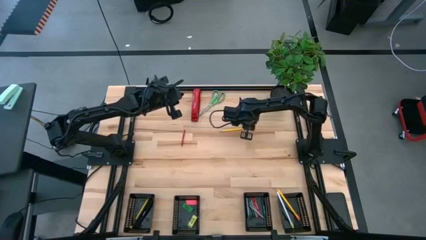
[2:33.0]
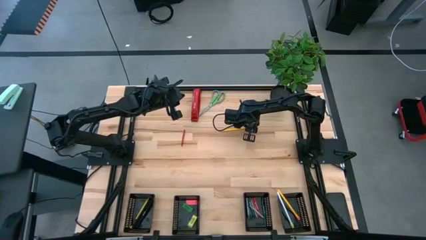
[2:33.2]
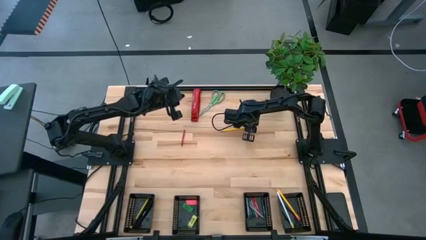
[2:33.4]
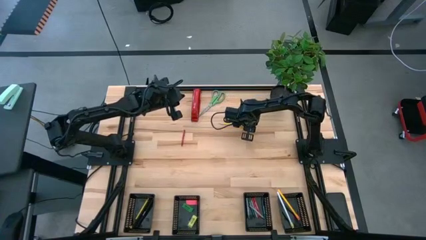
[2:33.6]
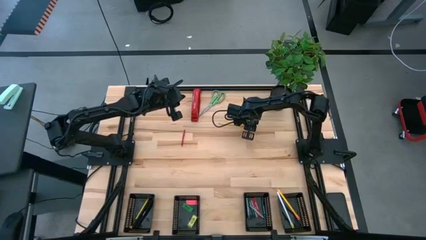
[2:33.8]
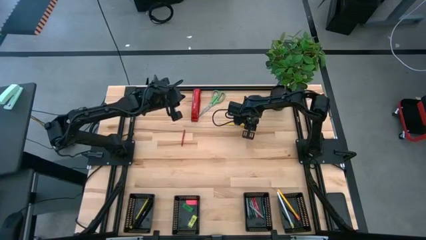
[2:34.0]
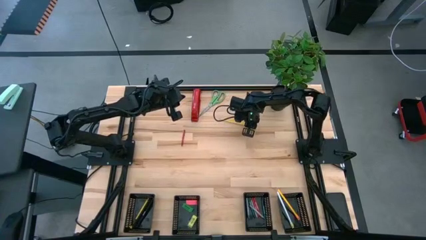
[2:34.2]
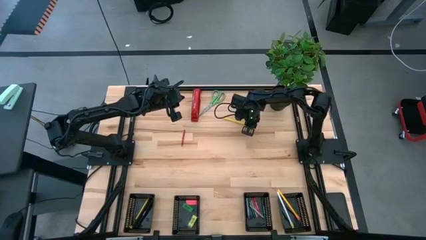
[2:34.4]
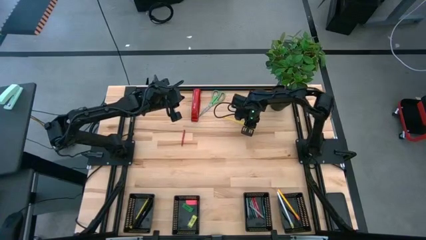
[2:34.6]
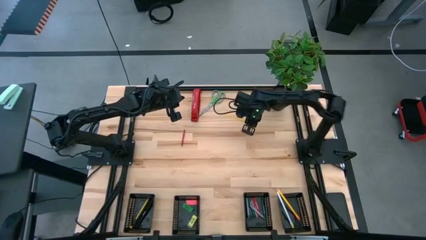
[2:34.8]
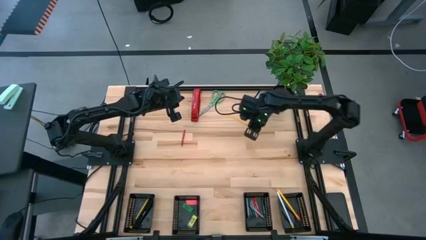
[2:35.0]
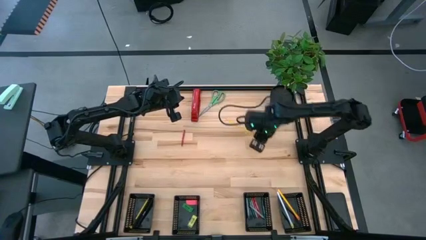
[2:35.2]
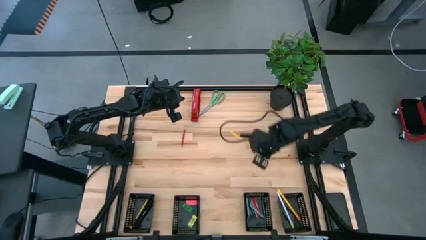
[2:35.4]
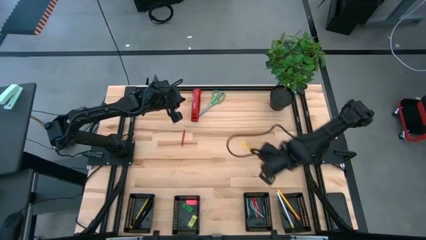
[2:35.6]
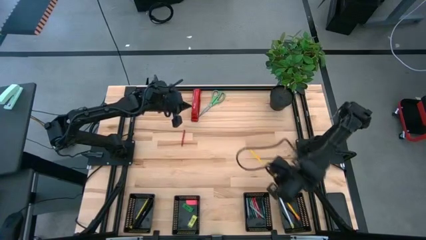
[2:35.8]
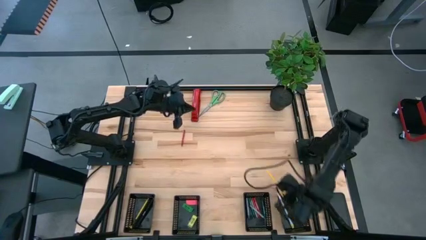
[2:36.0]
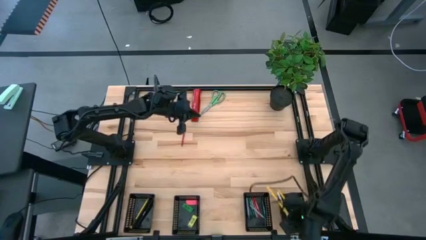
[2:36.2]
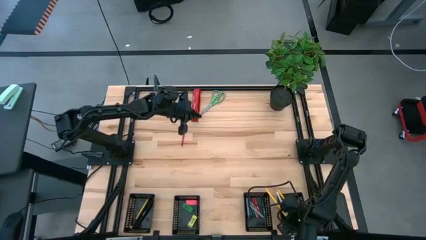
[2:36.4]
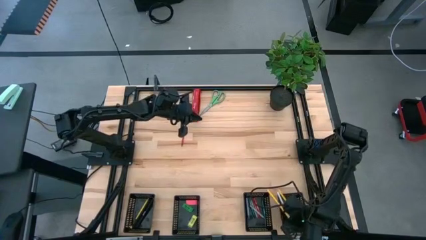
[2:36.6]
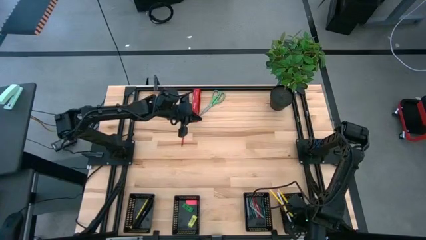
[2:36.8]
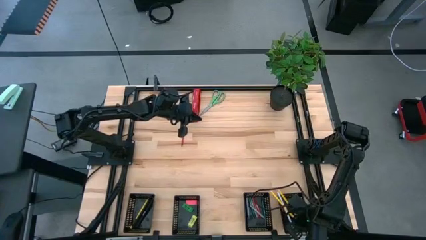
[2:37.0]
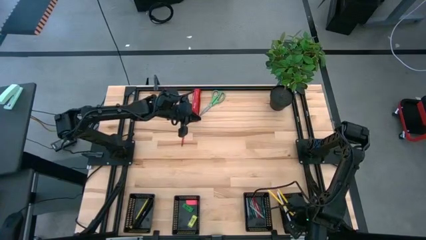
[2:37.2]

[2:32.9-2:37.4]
Task: Sort crayons/erasers/pens/pencils in bins
Put the yellow pencil into the right black bin

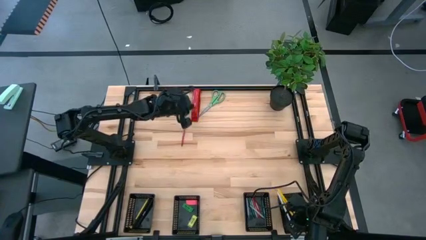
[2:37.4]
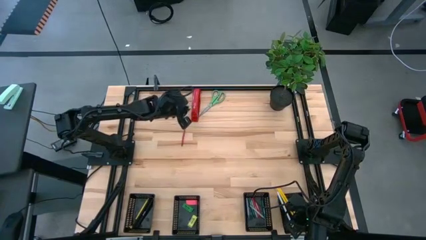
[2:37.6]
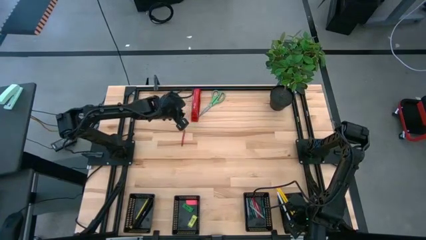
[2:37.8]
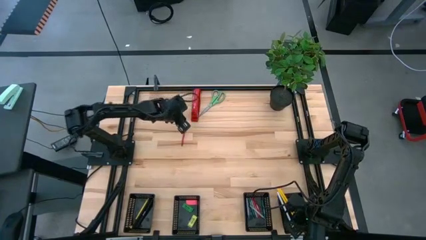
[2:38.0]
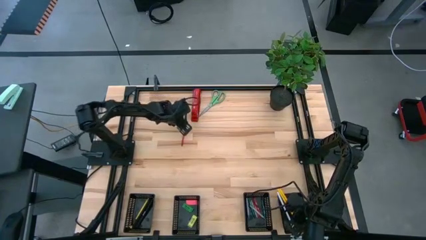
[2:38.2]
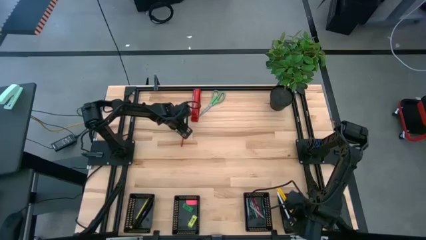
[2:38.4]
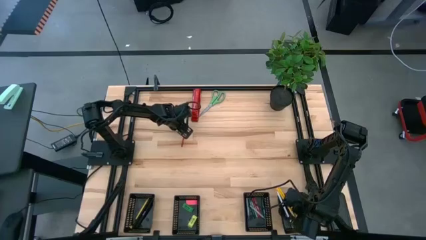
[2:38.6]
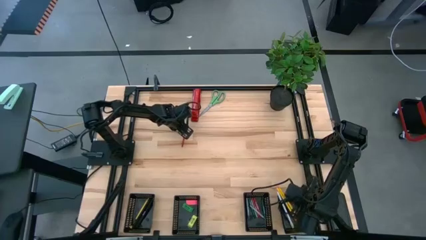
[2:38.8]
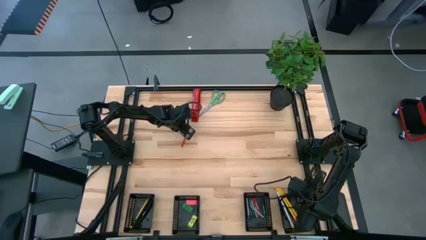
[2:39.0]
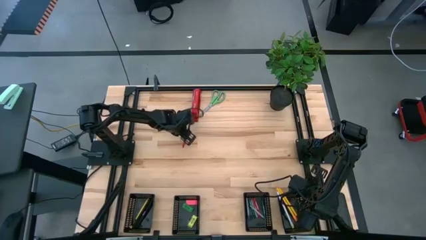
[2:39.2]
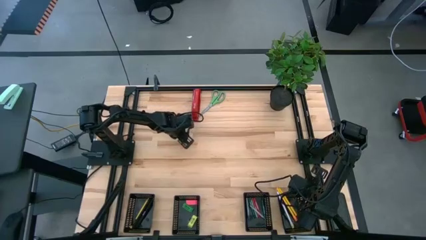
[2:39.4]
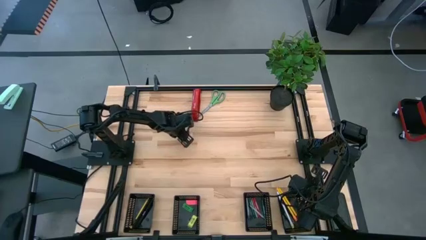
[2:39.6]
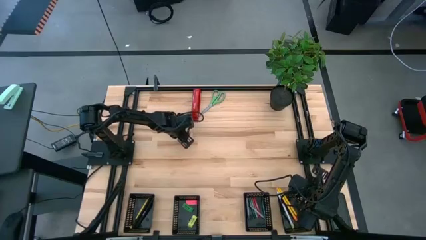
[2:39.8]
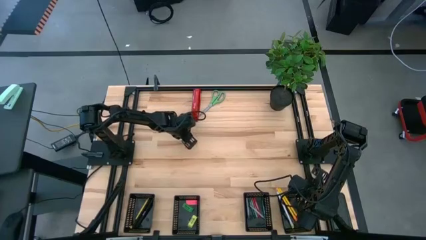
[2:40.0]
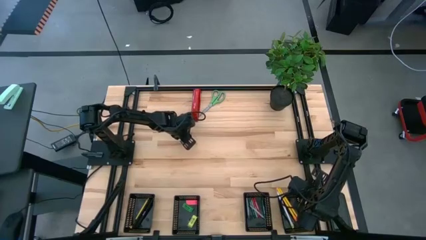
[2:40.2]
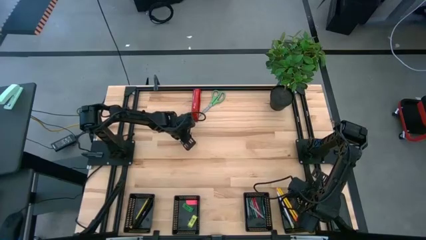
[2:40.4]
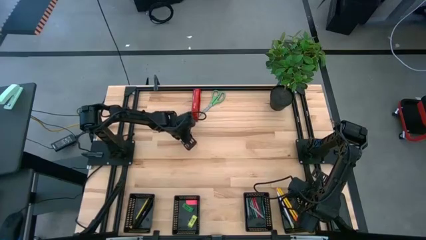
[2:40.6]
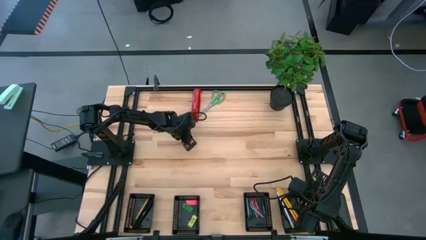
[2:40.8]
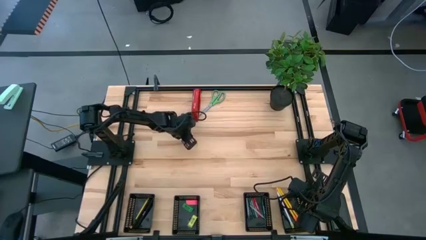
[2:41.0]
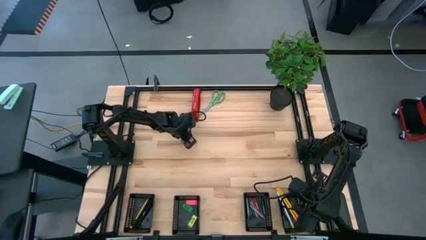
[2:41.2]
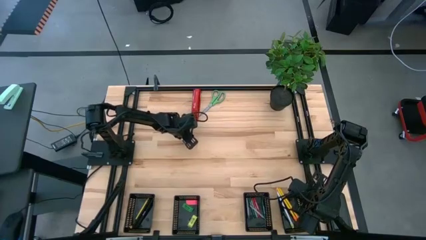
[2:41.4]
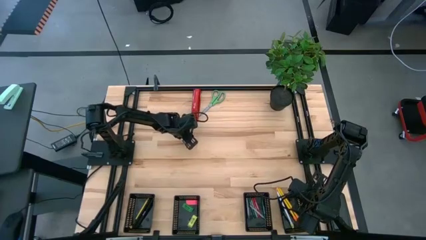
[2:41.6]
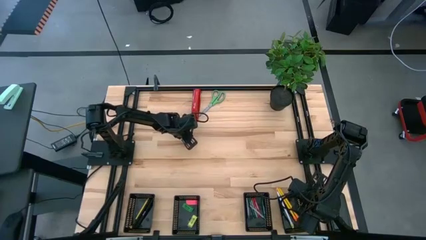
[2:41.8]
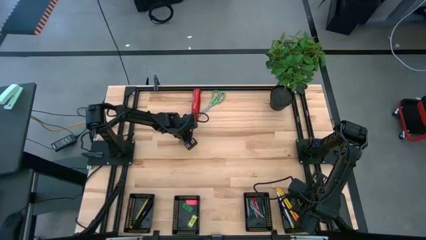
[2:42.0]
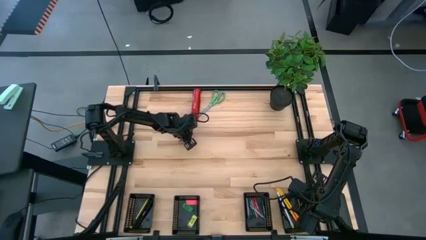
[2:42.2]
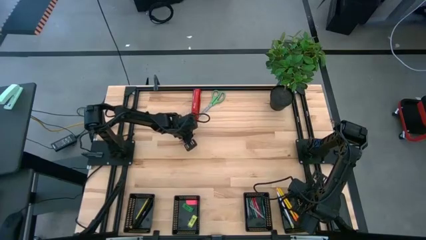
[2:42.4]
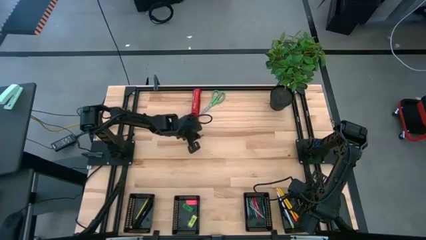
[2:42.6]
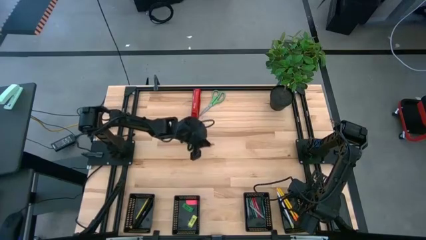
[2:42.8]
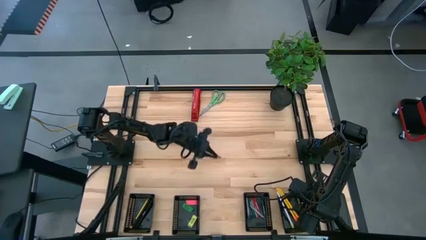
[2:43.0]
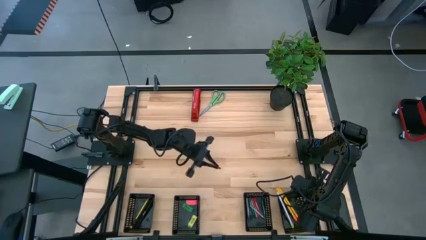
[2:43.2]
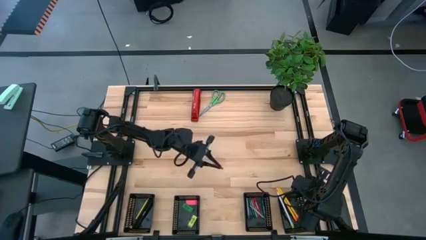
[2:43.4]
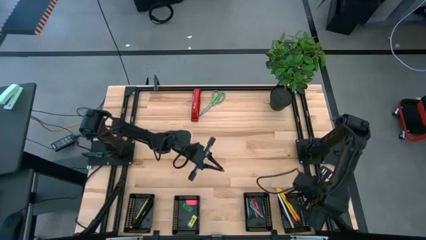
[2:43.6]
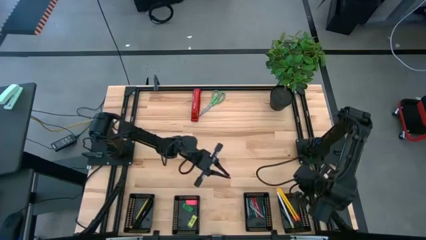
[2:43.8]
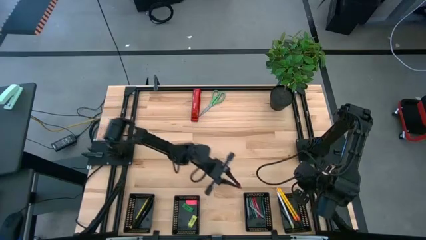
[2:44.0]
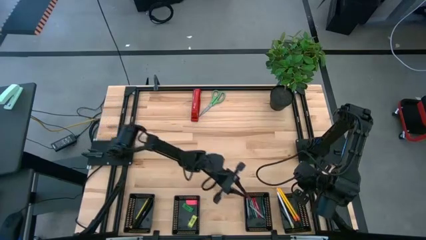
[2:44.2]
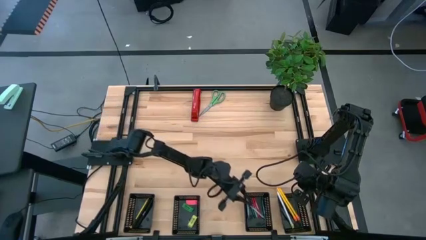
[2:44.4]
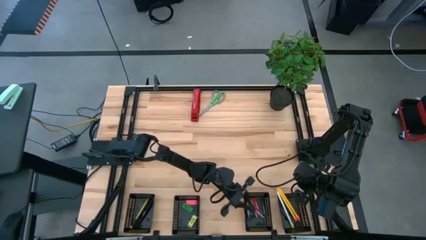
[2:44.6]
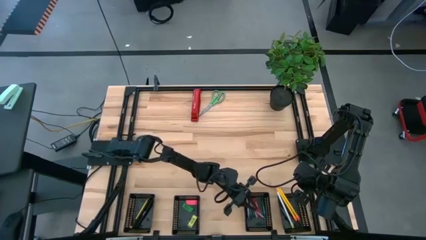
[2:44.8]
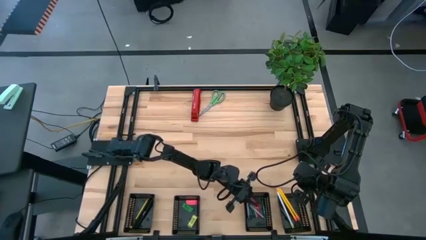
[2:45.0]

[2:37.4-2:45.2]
Put the red crayon into the middle right black bin

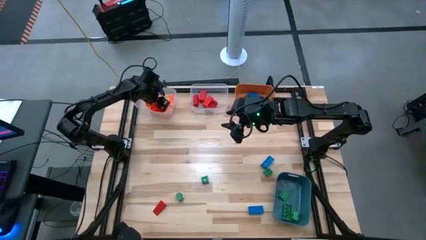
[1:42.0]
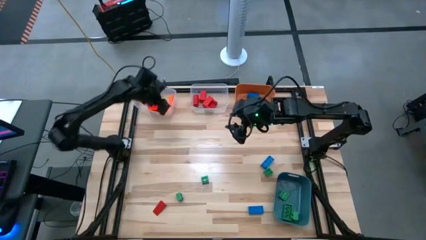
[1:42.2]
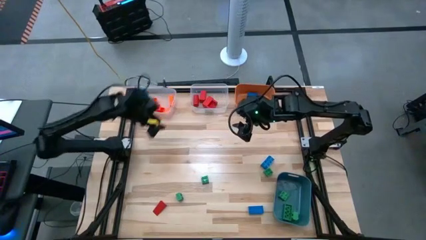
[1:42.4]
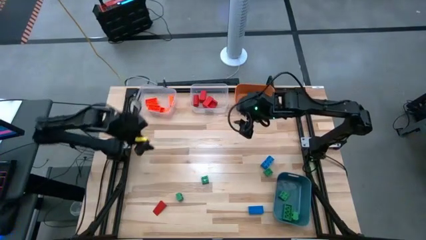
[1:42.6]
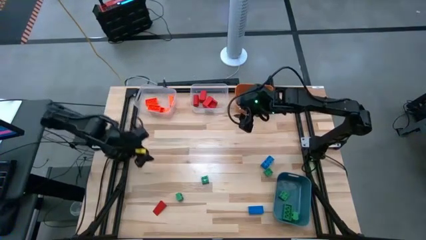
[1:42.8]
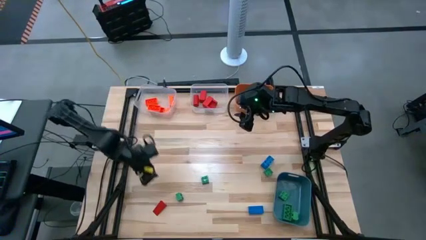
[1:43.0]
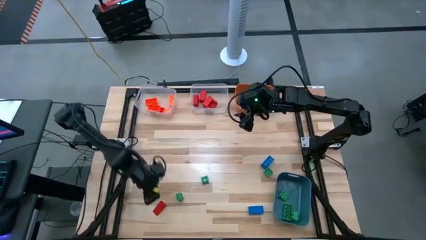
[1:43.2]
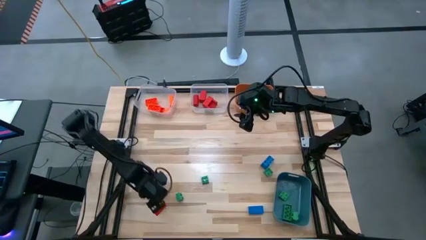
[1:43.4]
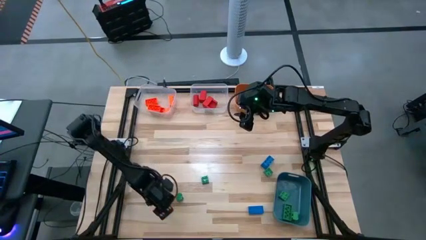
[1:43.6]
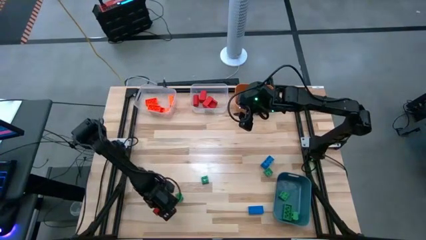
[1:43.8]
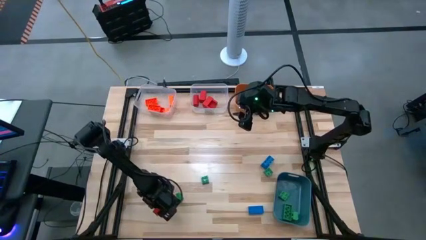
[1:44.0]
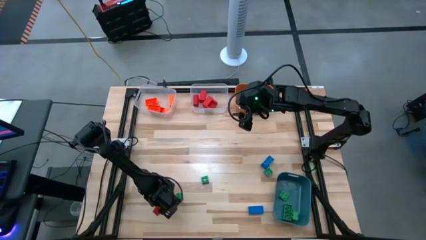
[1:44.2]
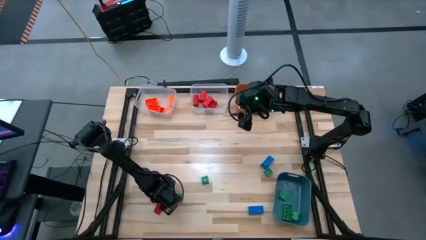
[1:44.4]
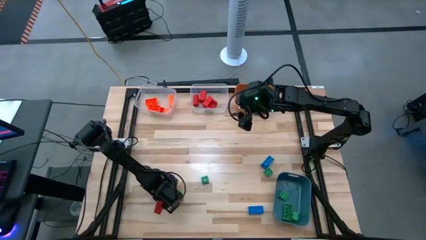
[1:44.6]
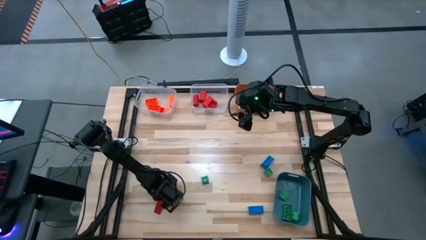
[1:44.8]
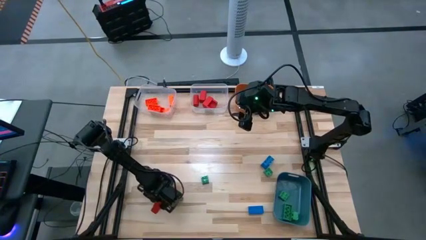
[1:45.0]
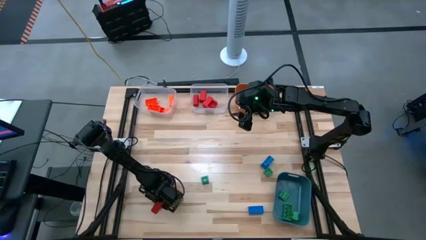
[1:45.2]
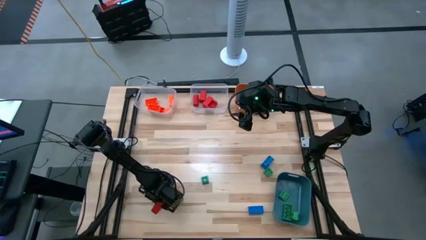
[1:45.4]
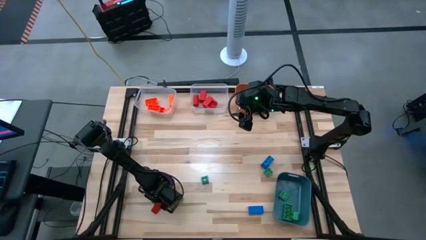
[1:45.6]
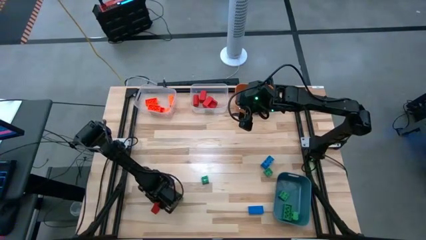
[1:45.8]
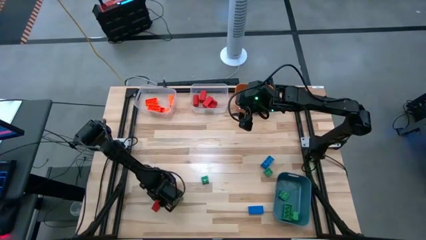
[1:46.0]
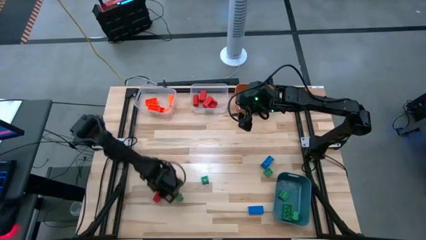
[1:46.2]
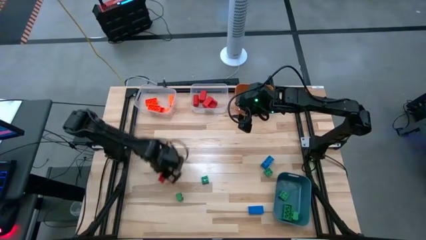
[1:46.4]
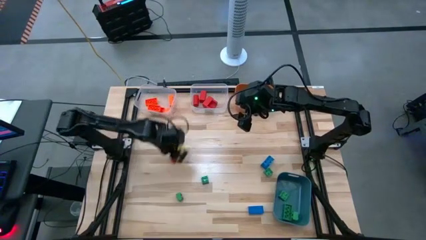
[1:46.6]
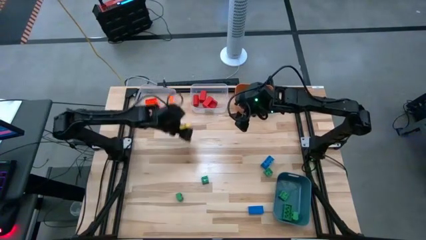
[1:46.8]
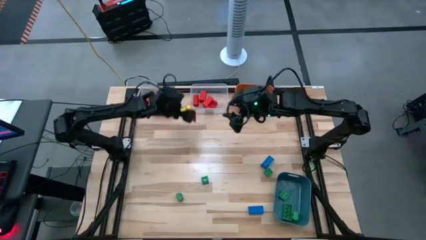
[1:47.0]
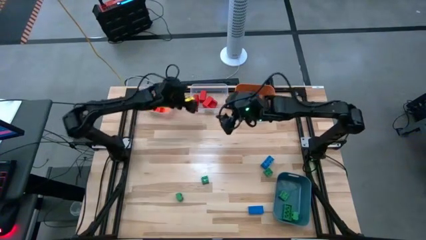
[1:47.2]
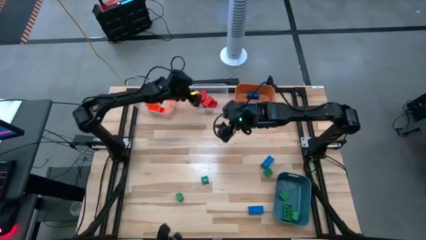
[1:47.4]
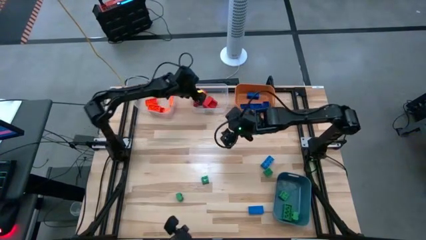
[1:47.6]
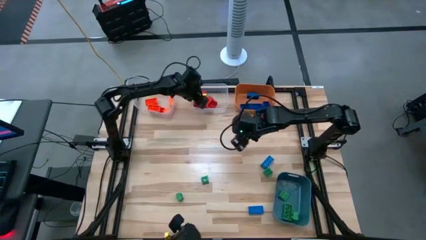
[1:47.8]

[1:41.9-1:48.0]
Task: Sort blocks
Put the red block into the right transparent bin
